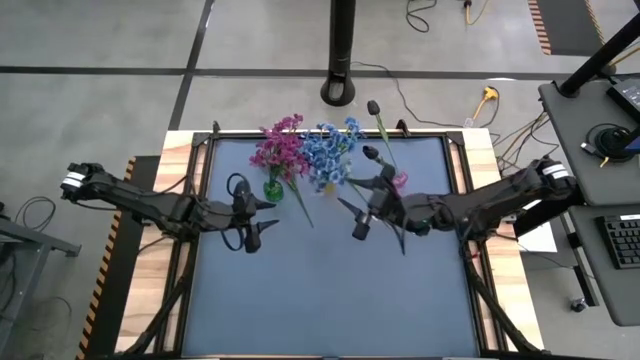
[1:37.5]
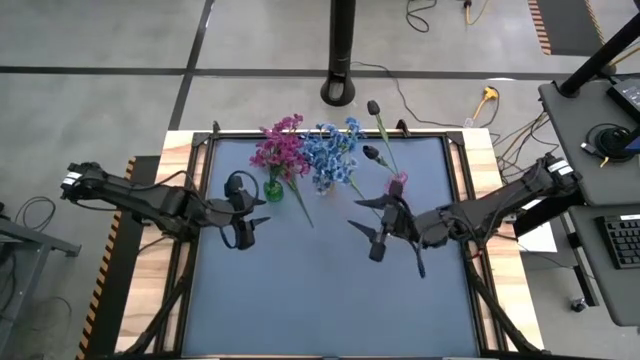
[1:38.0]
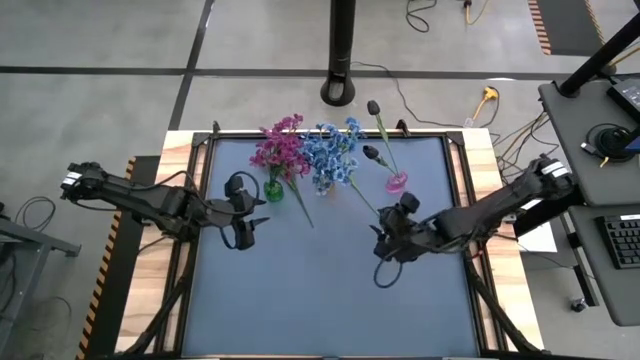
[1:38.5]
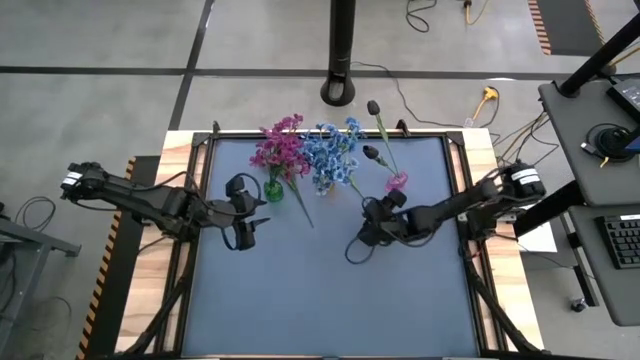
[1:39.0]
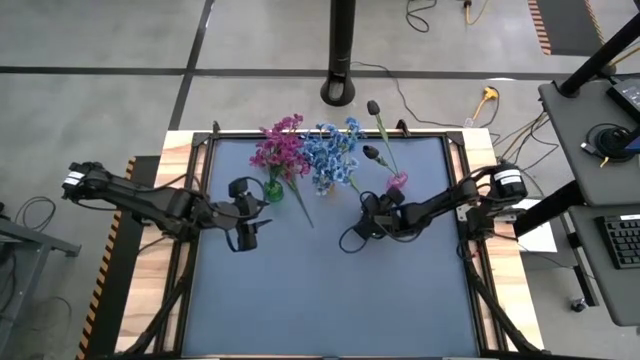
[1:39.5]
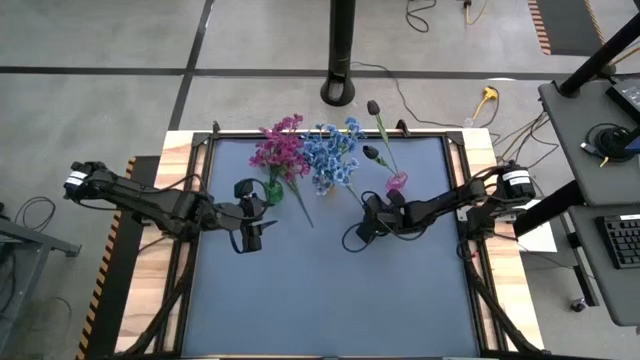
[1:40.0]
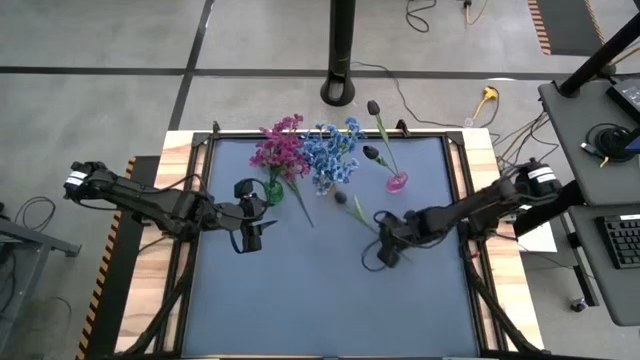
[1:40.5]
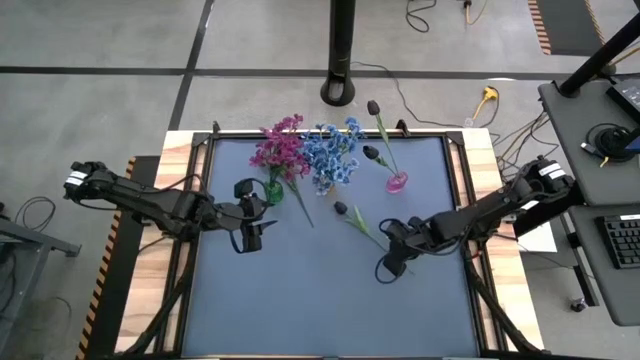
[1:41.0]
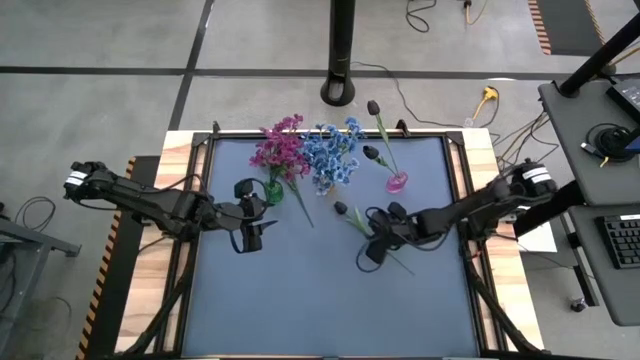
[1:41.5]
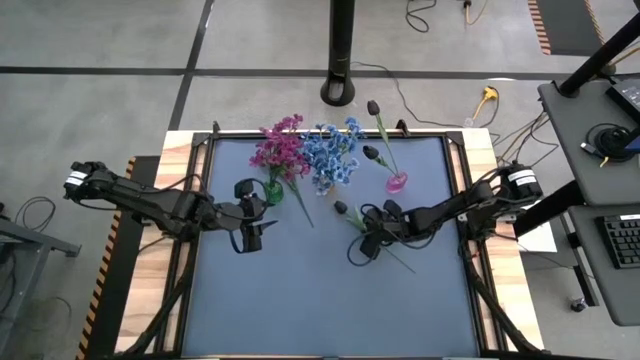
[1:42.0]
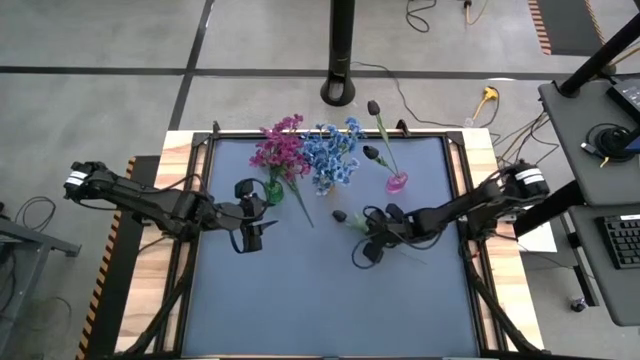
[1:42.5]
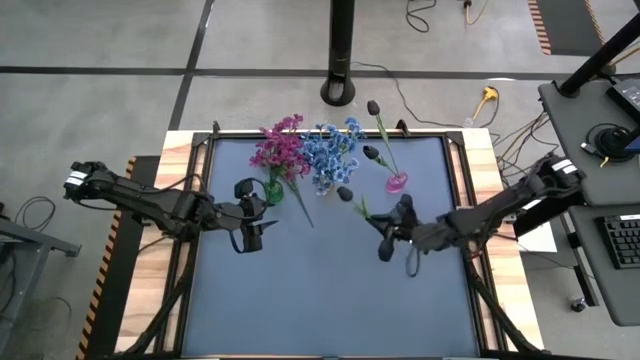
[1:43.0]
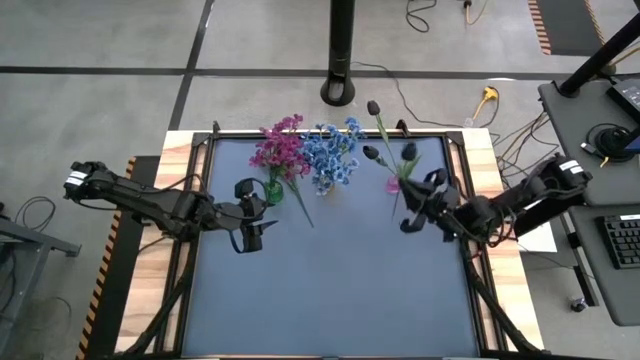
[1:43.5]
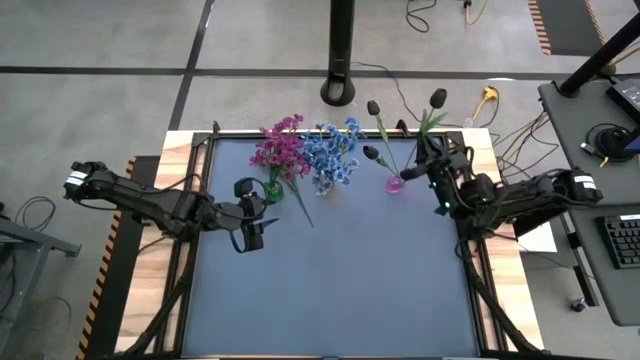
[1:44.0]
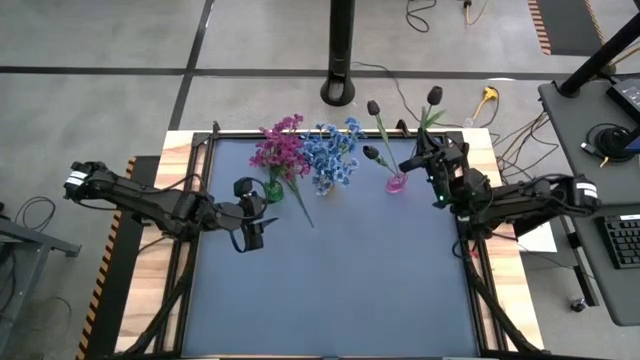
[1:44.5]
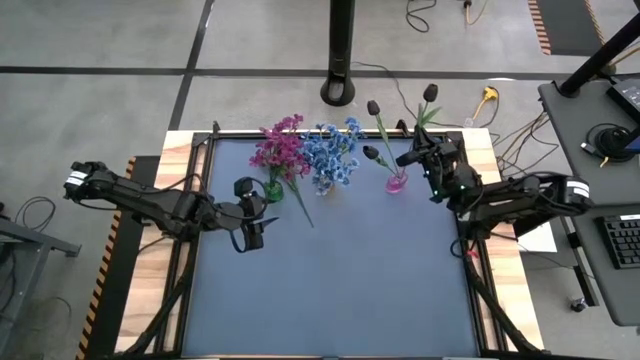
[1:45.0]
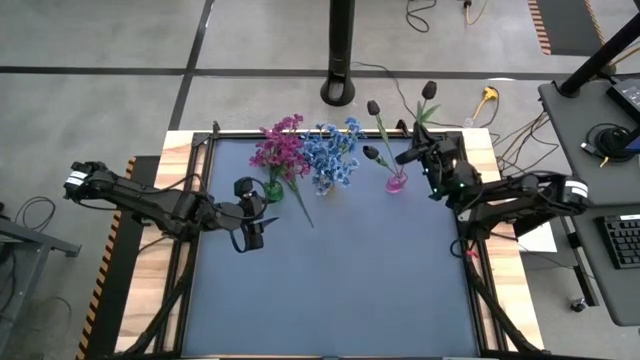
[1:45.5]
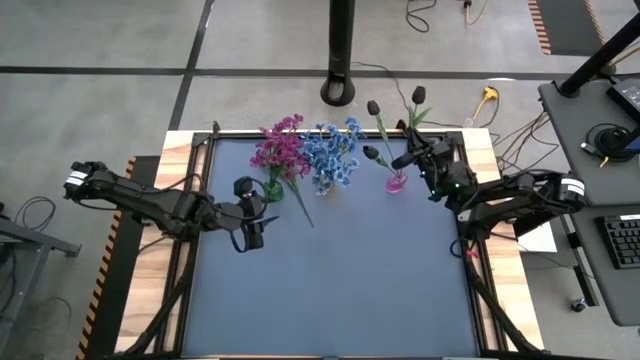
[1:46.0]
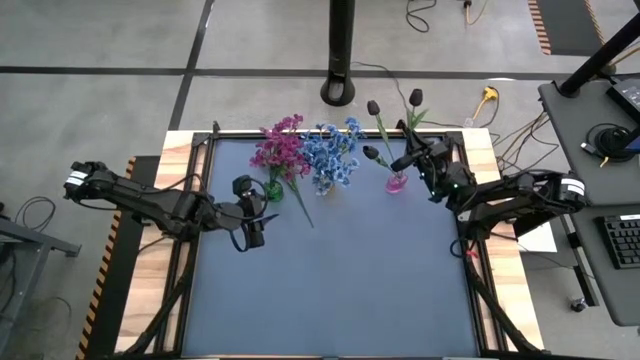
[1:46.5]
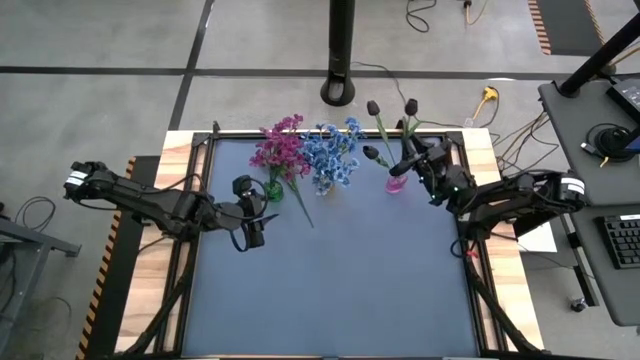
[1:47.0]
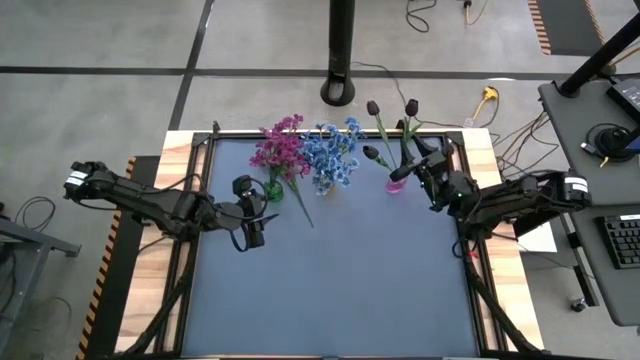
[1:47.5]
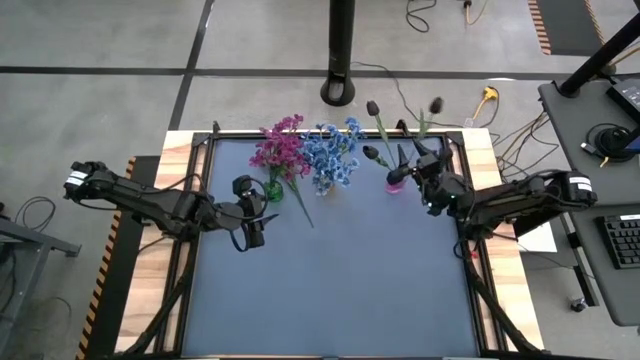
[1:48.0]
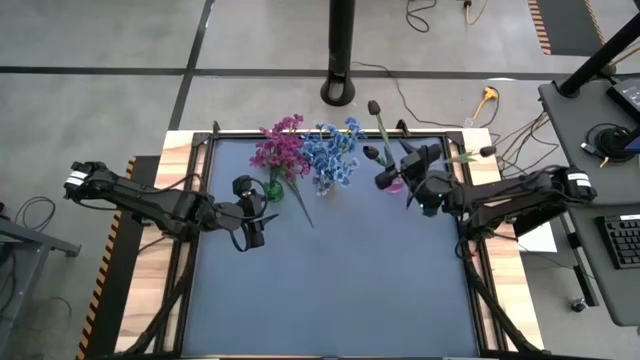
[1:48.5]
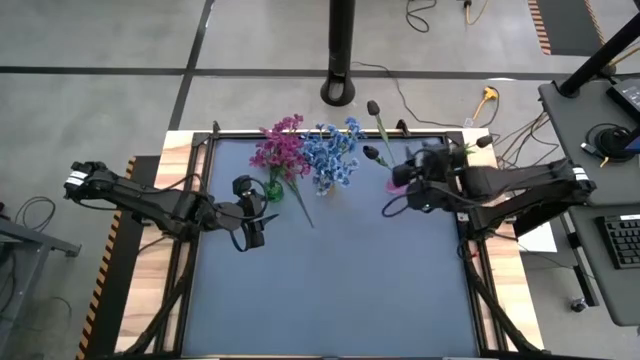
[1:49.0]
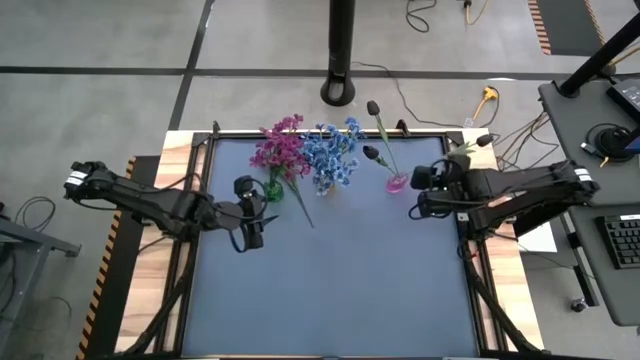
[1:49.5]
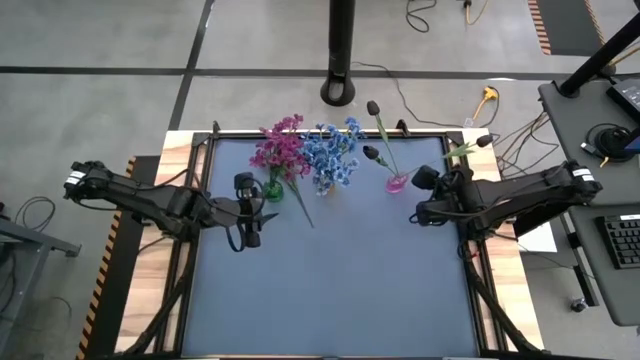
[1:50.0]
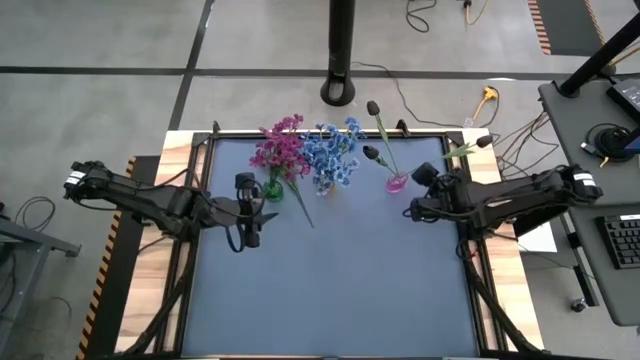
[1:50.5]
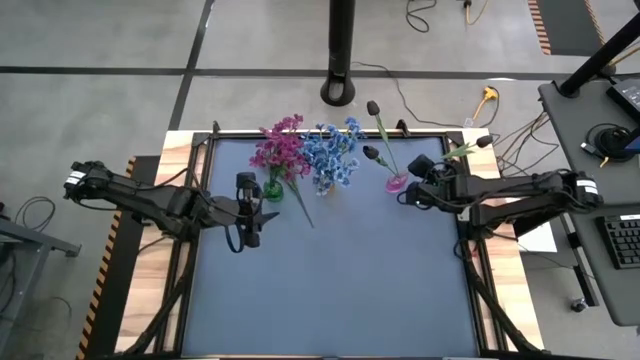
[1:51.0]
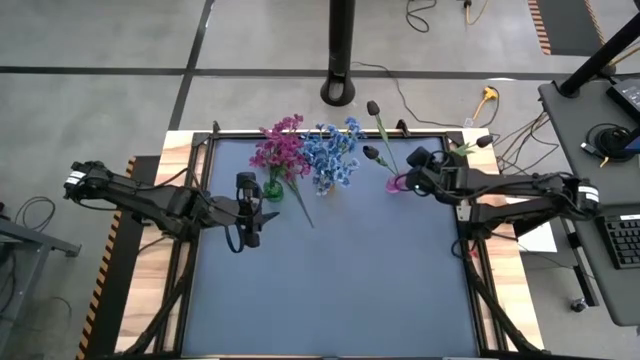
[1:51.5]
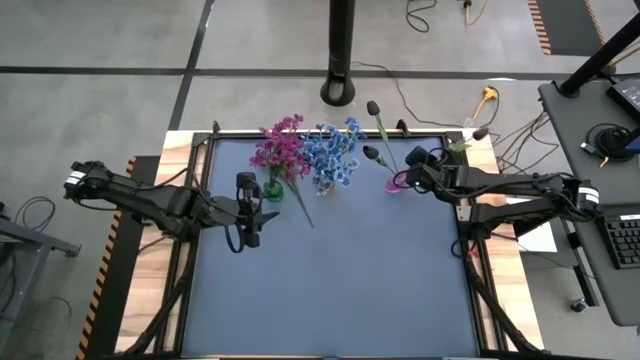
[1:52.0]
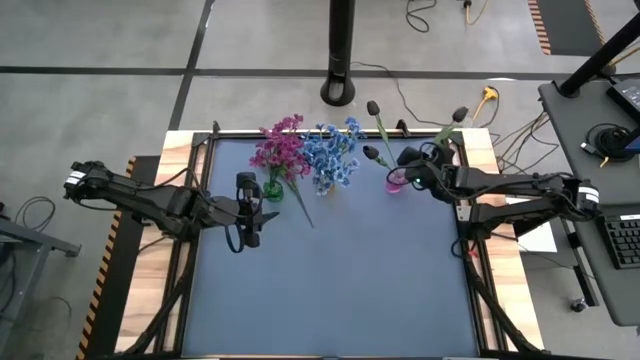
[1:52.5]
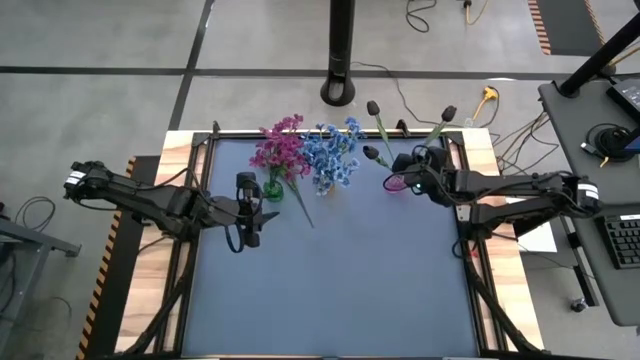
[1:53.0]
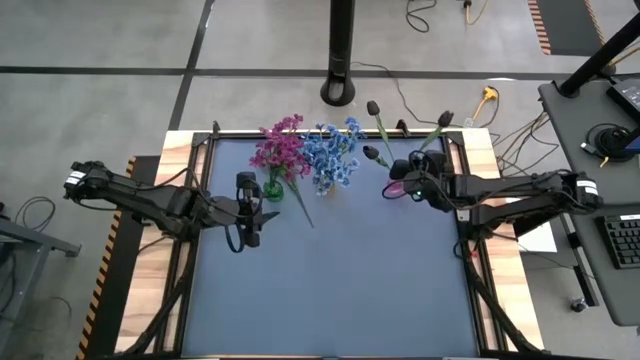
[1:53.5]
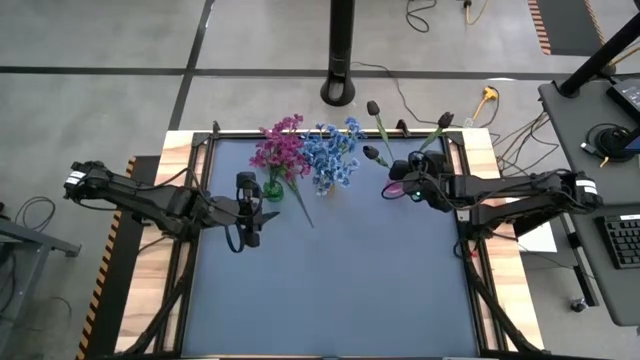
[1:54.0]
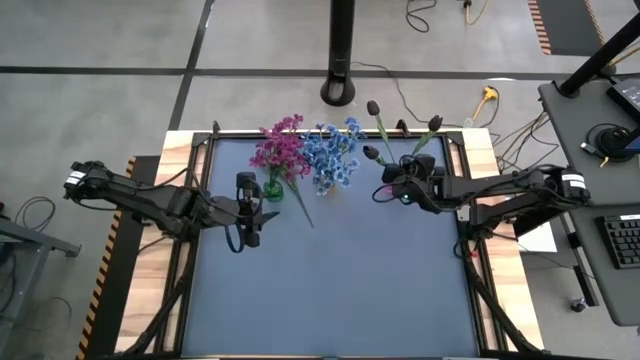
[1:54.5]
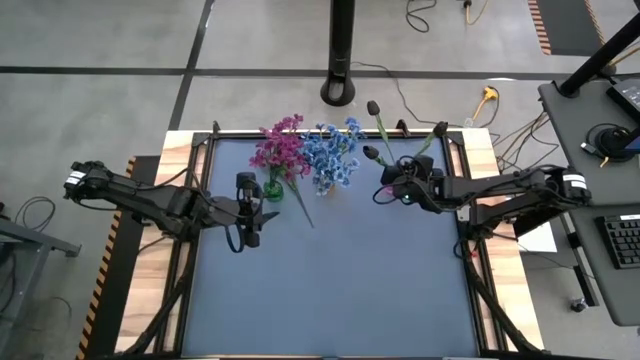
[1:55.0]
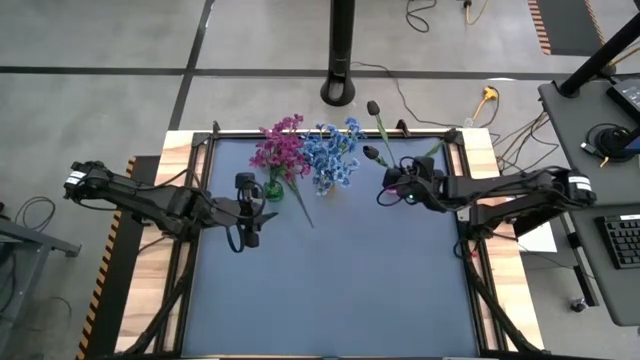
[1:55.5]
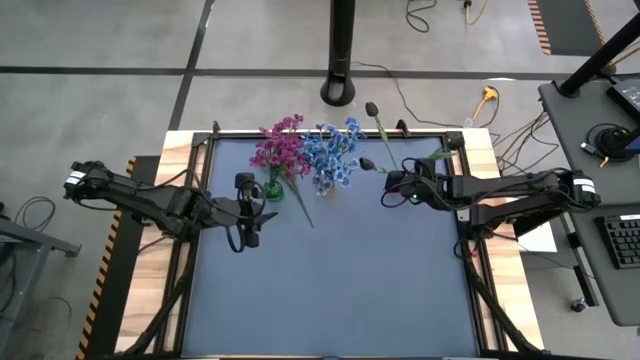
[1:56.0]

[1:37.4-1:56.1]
Task: Sort flowers into vase by color
Put the black flower into the purple flower vase
